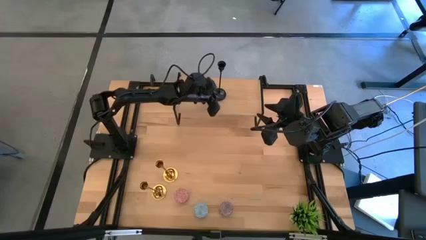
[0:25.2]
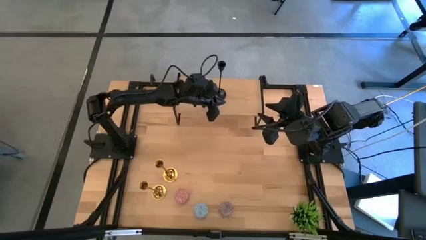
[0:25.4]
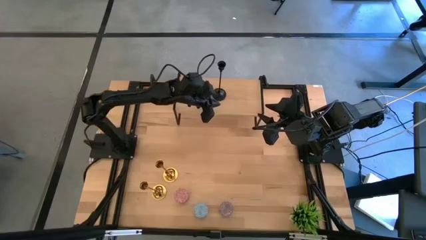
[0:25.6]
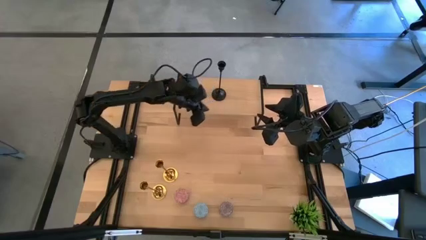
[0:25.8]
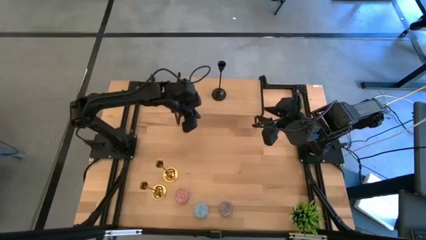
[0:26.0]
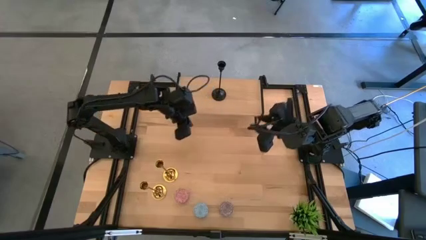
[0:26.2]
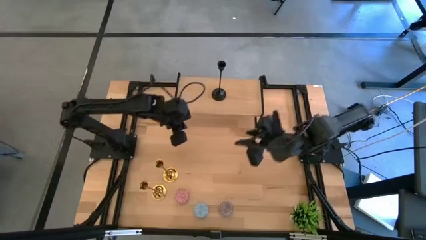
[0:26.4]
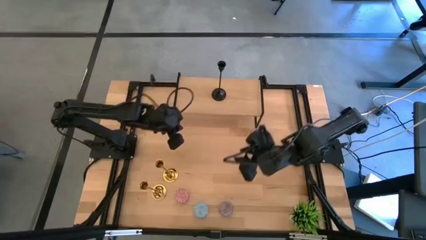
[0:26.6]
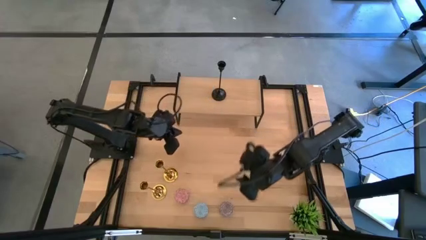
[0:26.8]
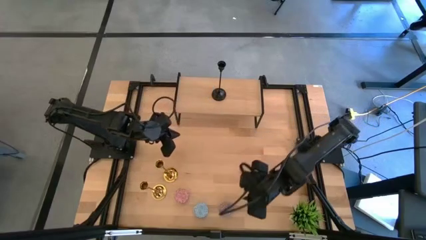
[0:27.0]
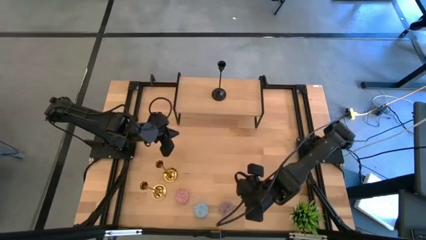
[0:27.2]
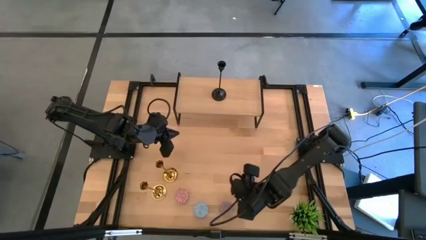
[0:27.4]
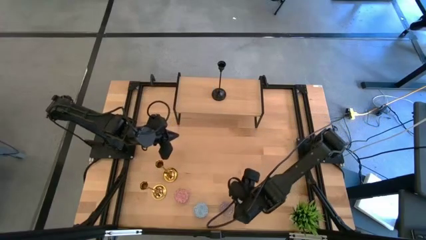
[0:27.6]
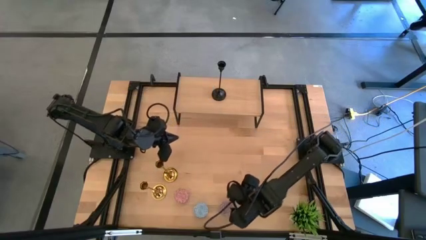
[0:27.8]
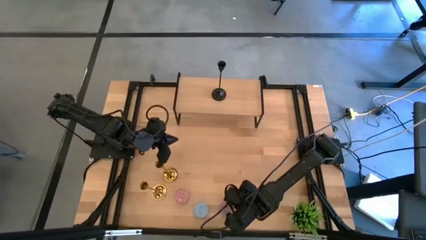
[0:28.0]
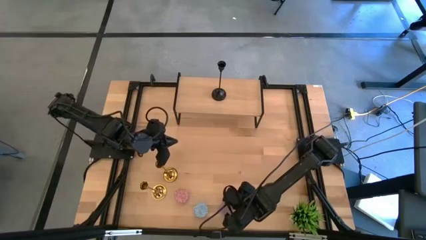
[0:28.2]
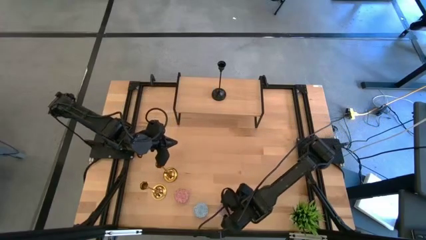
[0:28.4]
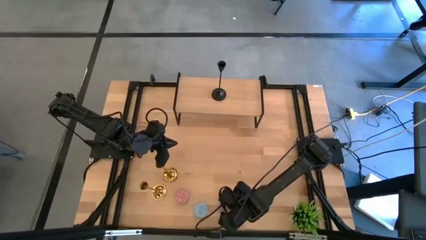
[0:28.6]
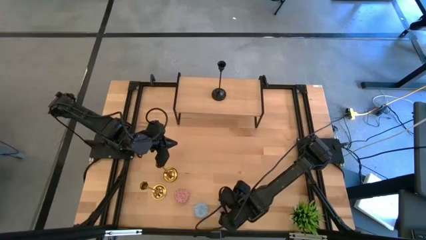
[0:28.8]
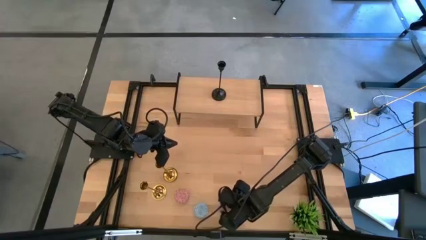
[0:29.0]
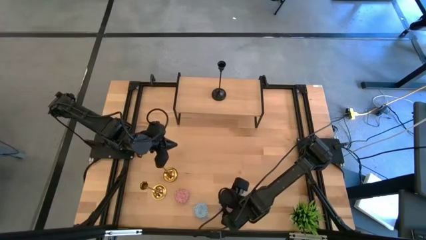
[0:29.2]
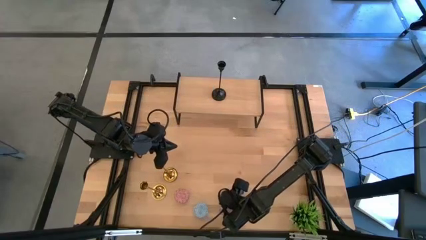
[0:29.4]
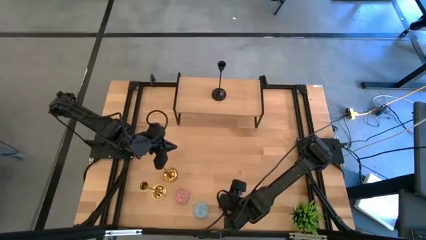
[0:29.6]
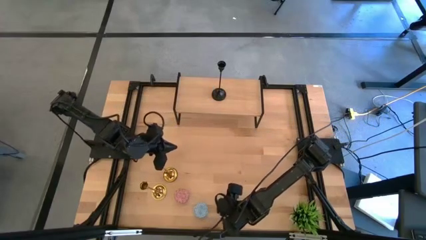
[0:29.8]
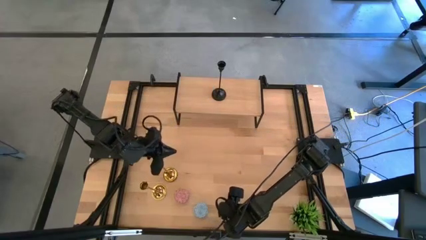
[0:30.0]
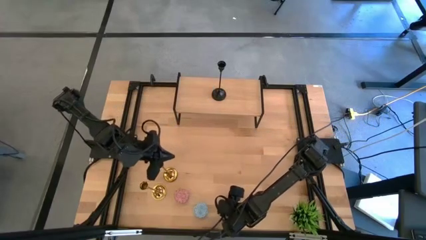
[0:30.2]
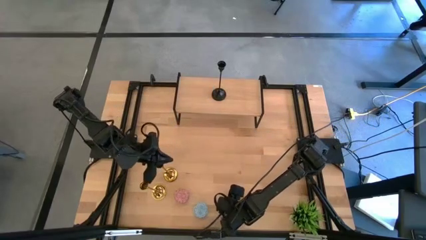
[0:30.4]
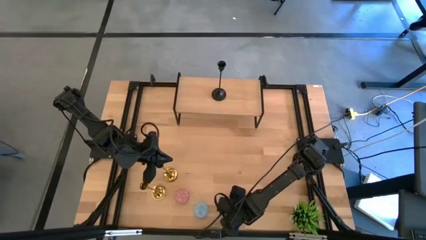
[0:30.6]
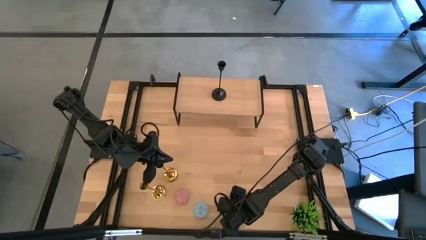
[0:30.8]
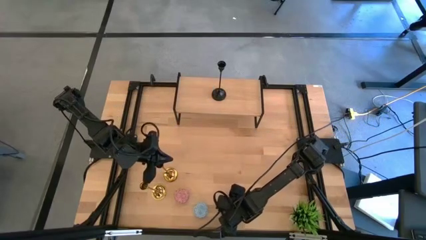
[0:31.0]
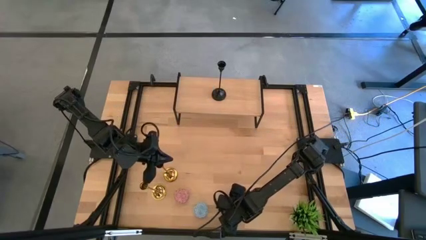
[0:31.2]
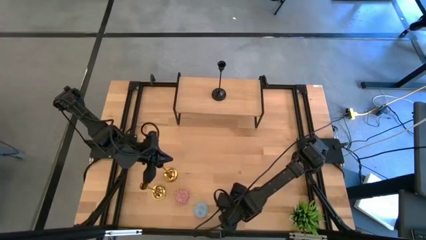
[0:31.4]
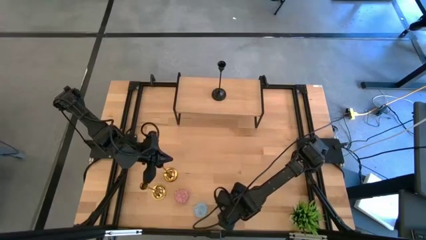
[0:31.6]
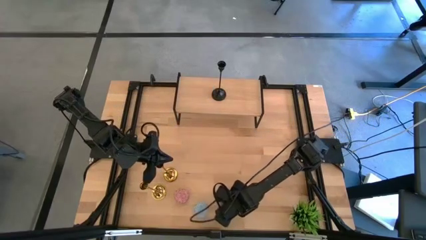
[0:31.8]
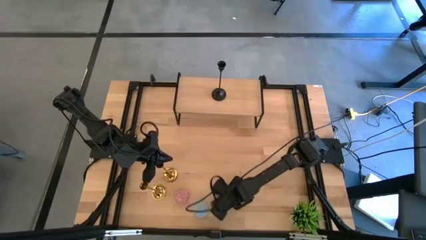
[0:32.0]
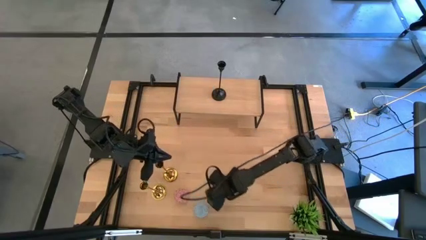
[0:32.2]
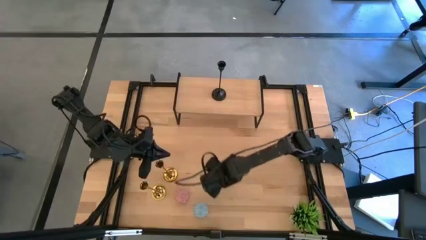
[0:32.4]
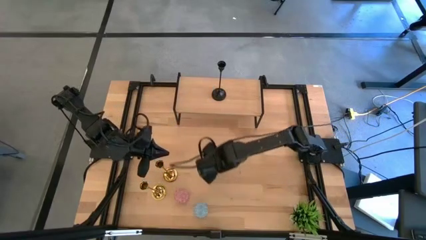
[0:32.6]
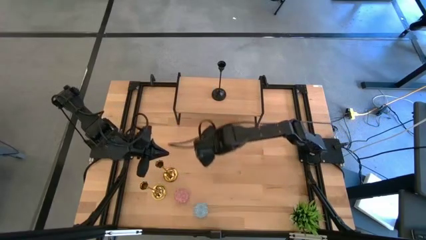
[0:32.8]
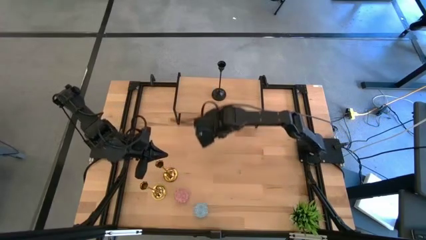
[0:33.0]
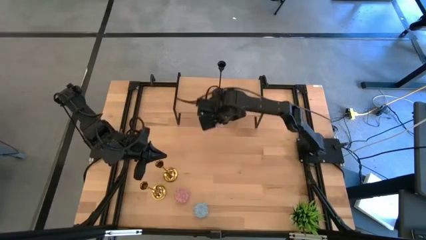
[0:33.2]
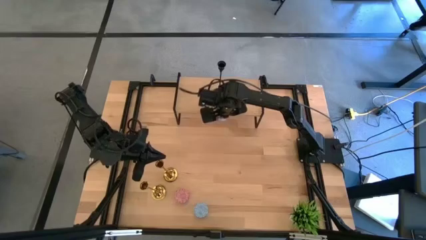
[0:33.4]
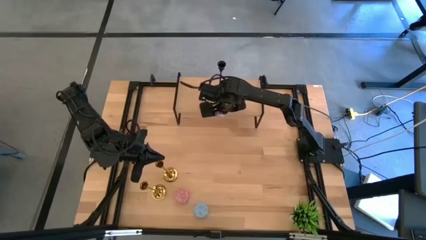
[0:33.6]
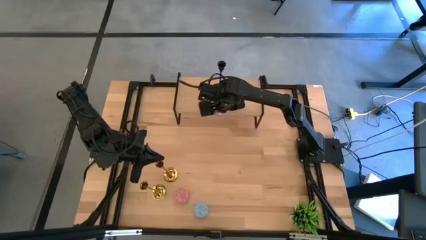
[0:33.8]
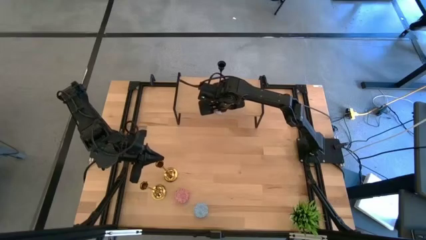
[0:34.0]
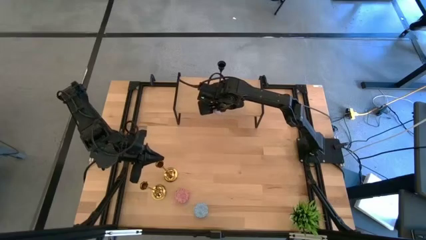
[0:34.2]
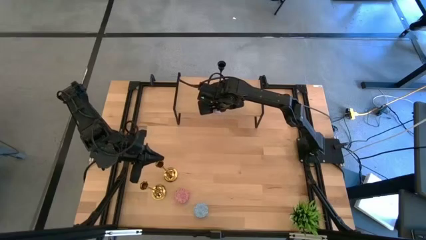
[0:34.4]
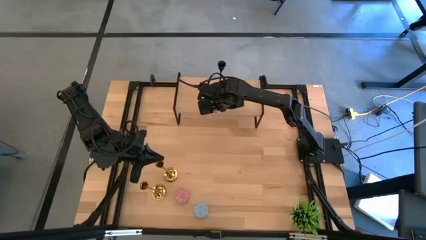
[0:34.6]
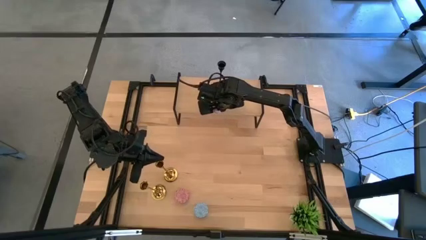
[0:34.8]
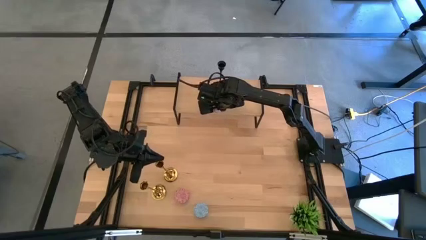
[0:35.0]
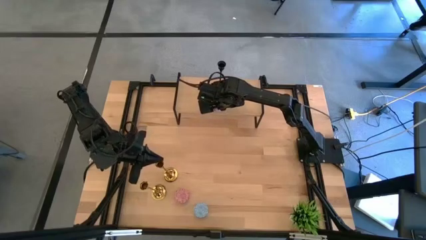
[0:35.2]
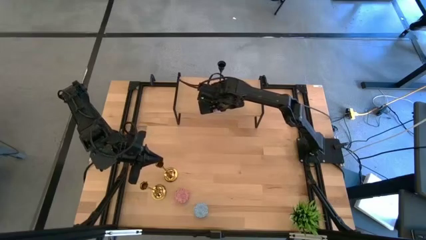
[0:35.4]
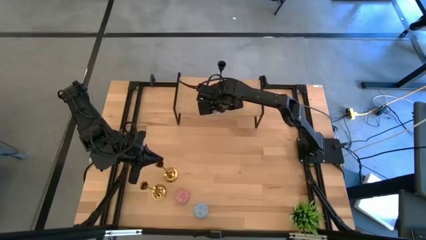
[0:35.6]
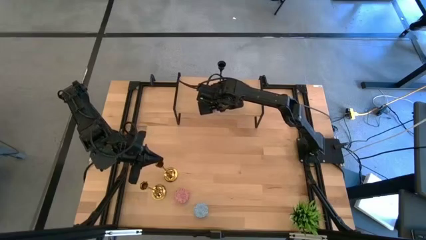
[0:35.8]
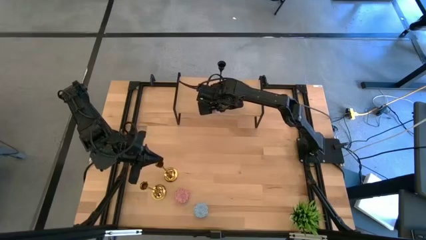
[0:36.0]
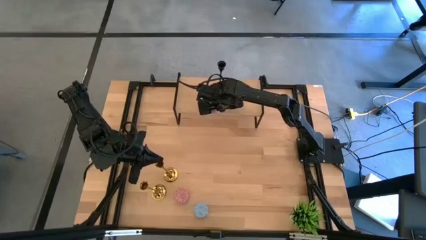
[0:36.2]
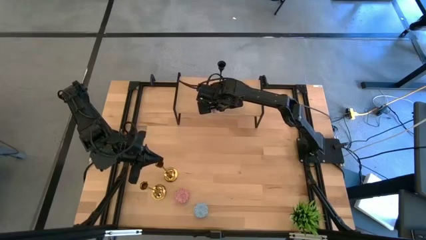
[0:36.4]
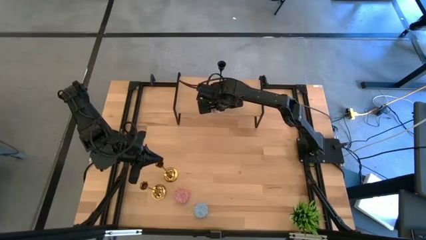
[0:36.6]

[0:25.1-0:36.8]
Task: Pick & Place candle stick holders
Put the red candle on the shelf
